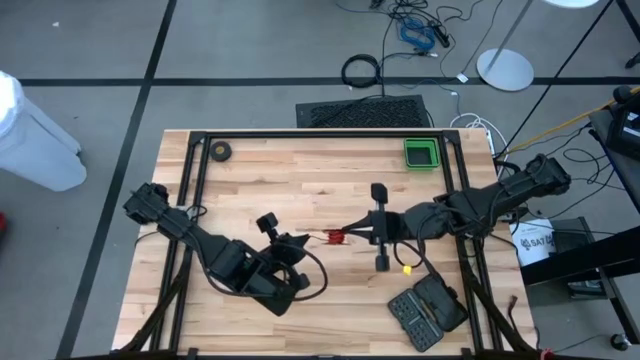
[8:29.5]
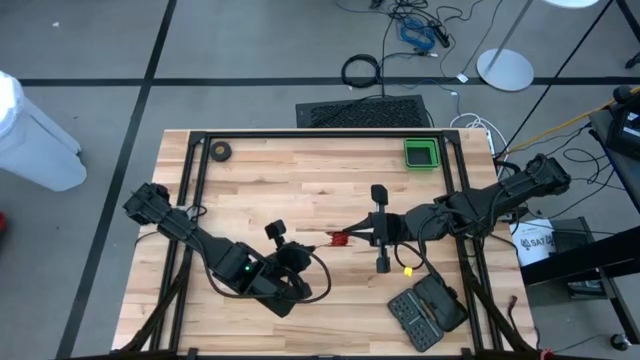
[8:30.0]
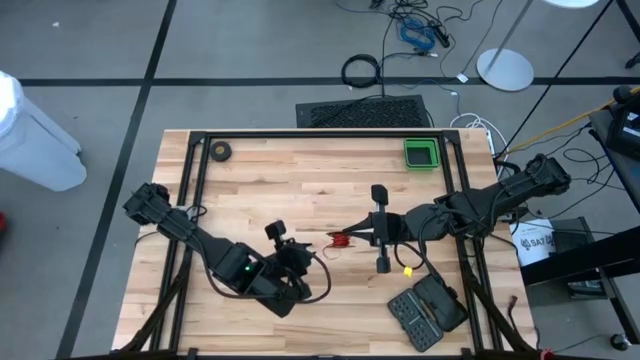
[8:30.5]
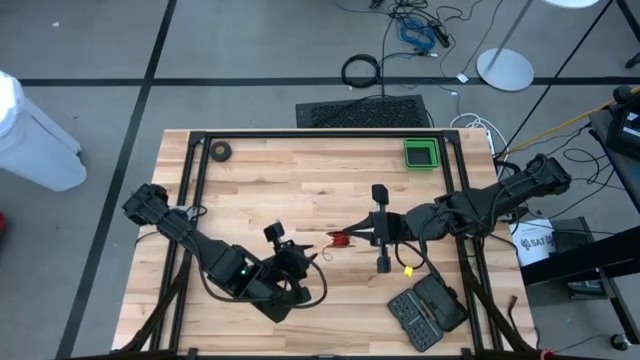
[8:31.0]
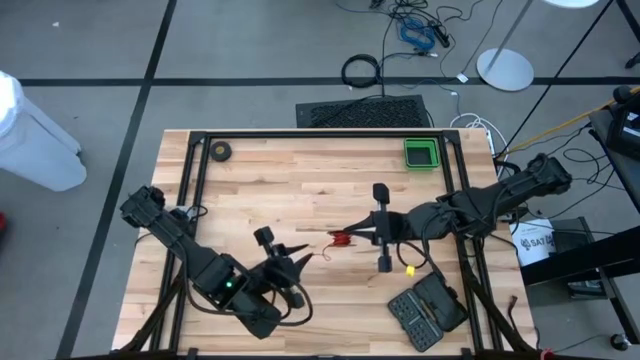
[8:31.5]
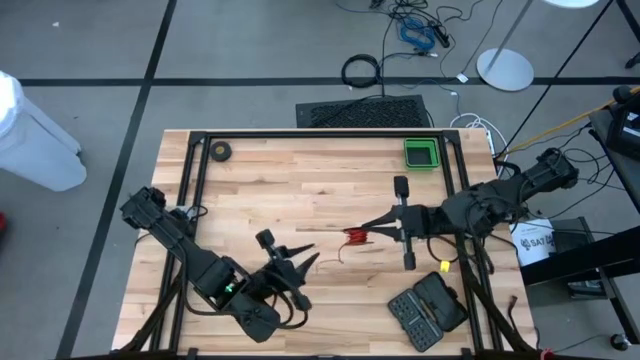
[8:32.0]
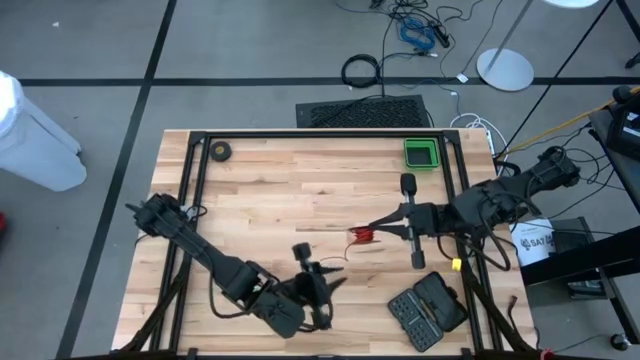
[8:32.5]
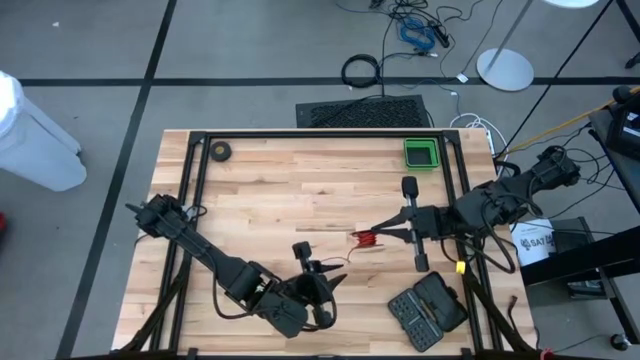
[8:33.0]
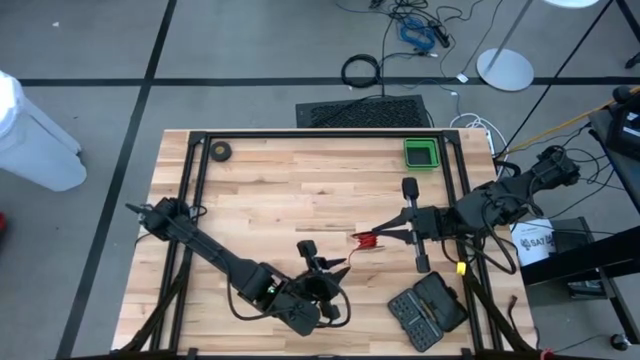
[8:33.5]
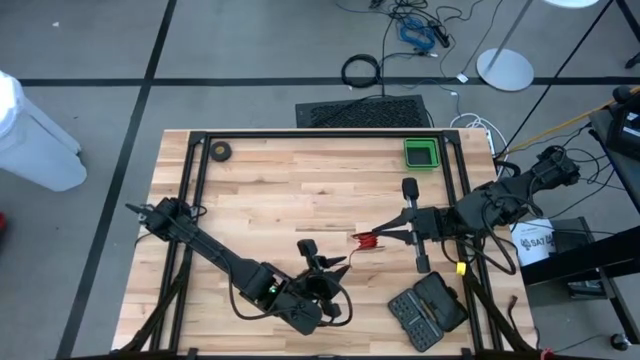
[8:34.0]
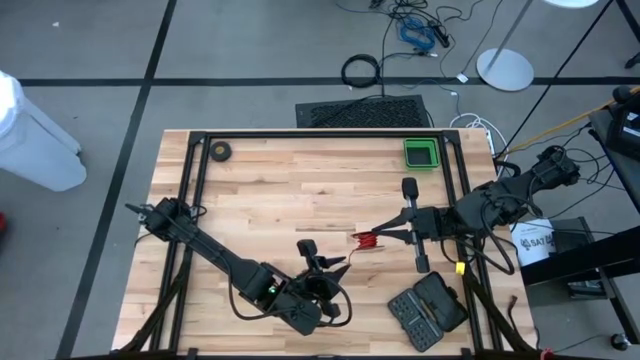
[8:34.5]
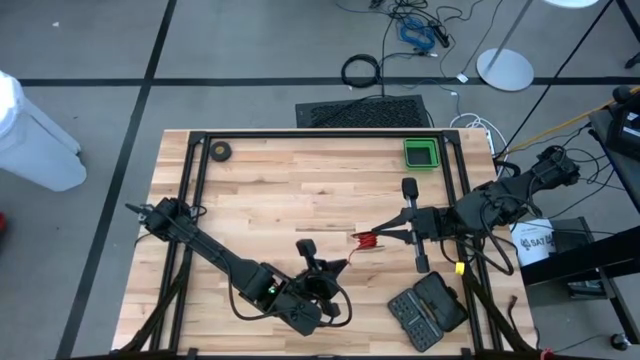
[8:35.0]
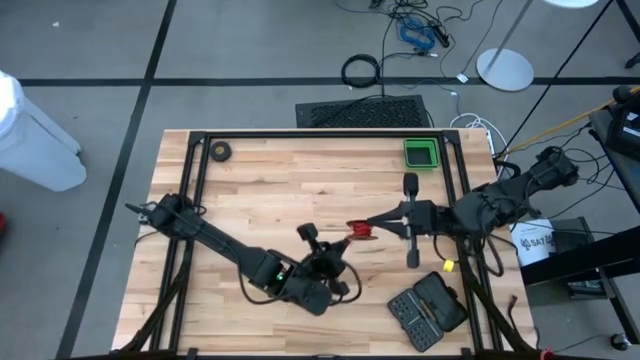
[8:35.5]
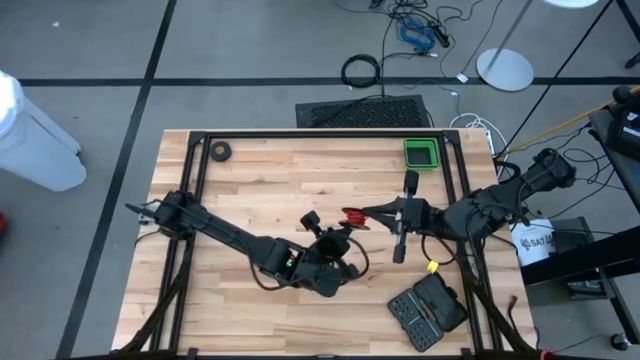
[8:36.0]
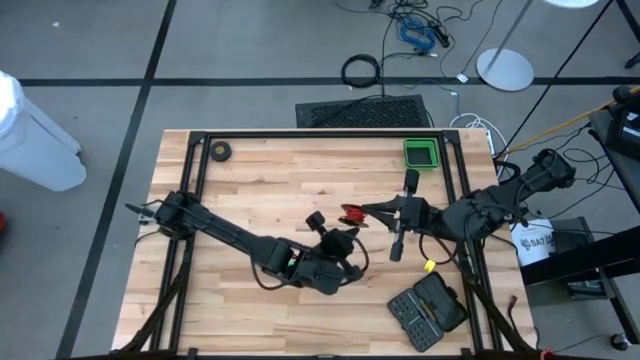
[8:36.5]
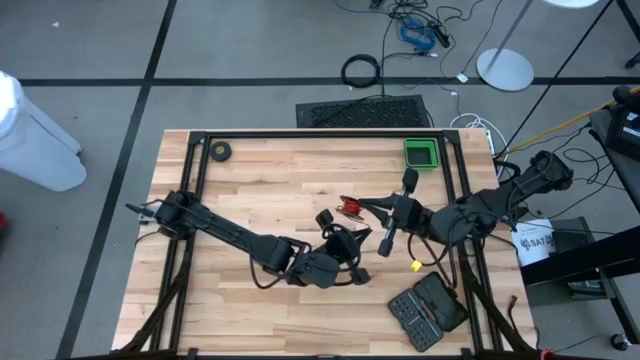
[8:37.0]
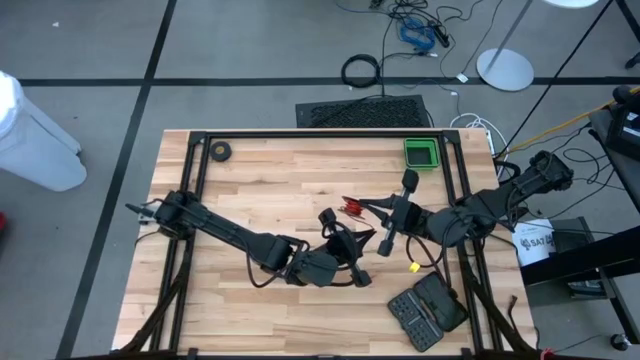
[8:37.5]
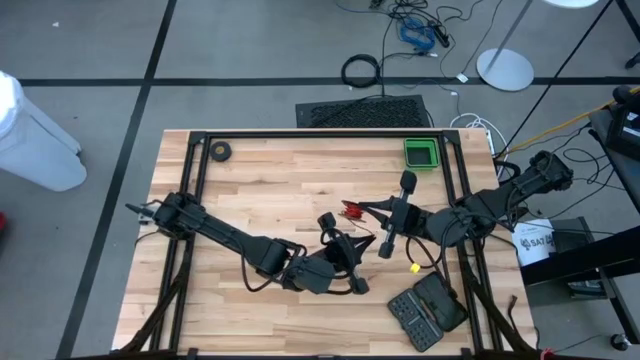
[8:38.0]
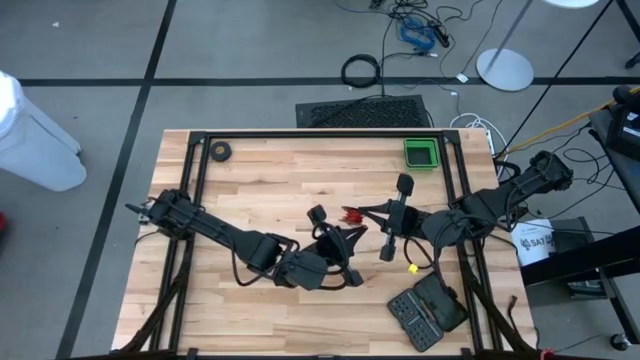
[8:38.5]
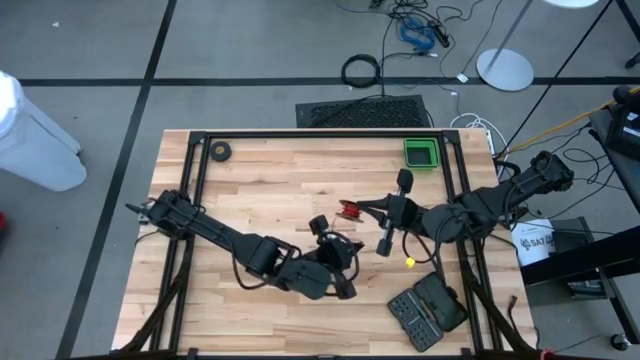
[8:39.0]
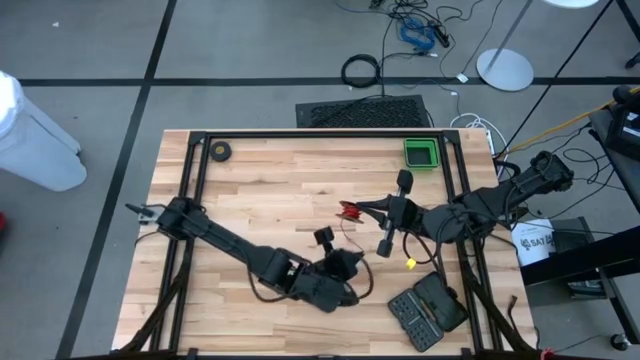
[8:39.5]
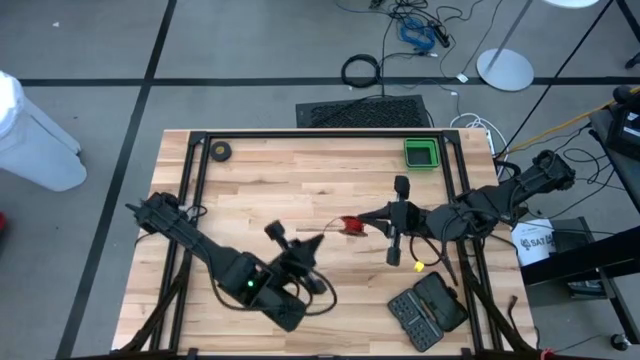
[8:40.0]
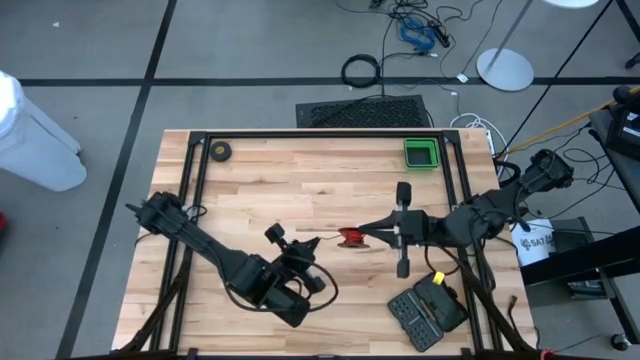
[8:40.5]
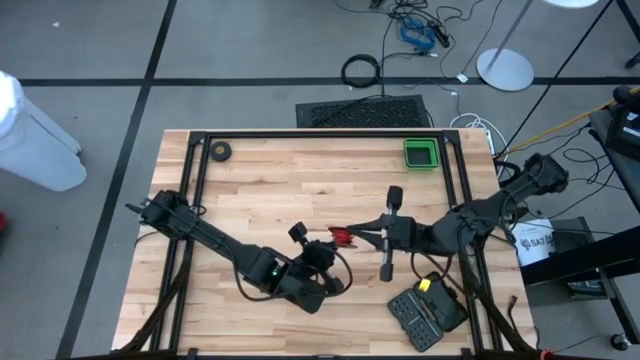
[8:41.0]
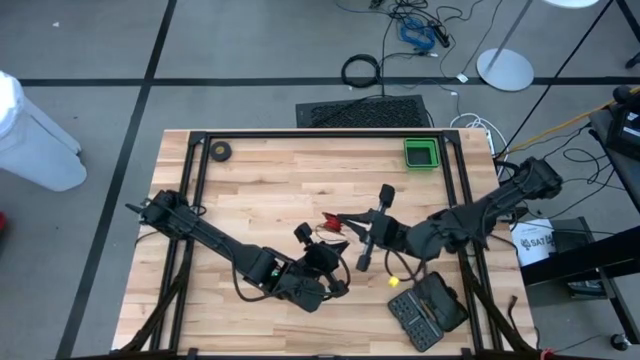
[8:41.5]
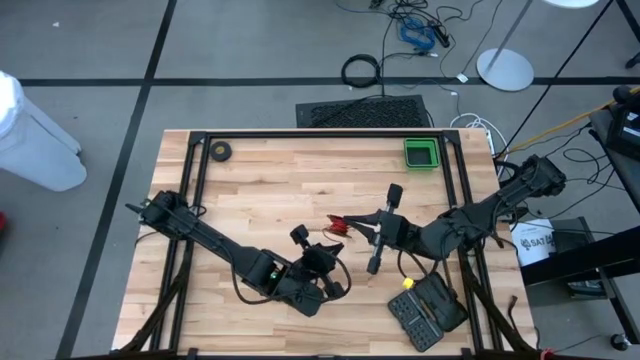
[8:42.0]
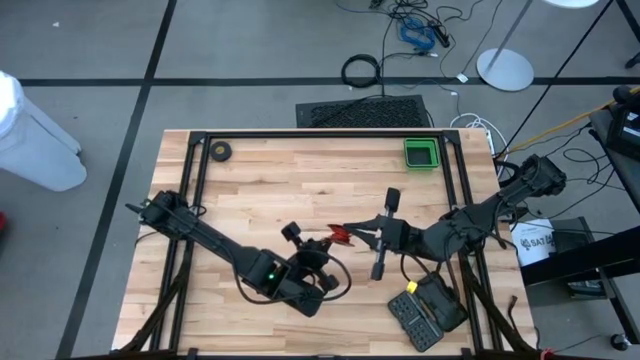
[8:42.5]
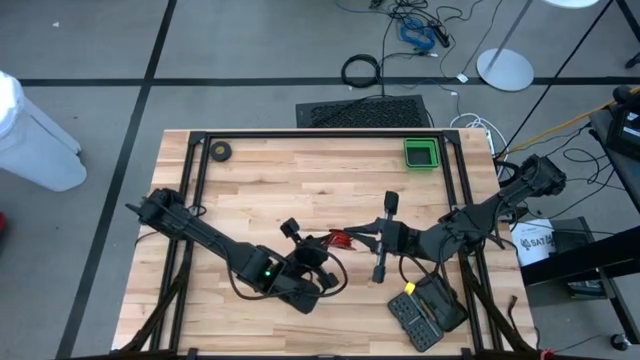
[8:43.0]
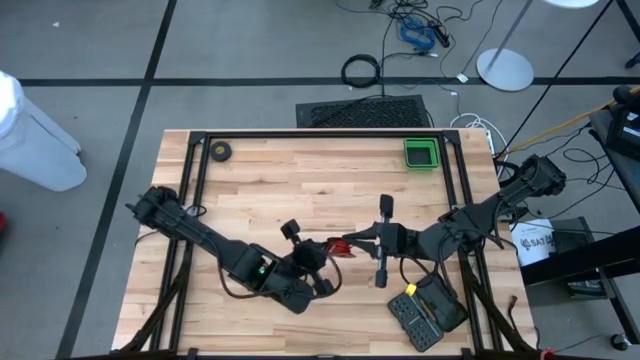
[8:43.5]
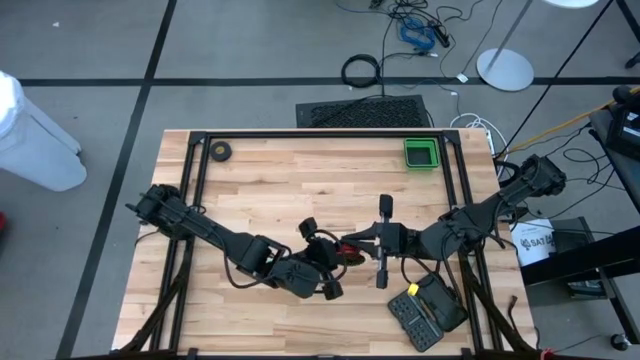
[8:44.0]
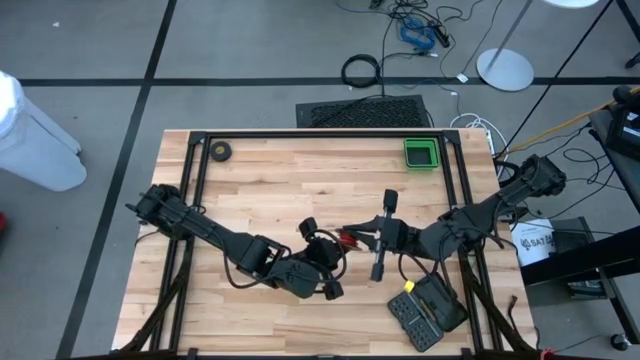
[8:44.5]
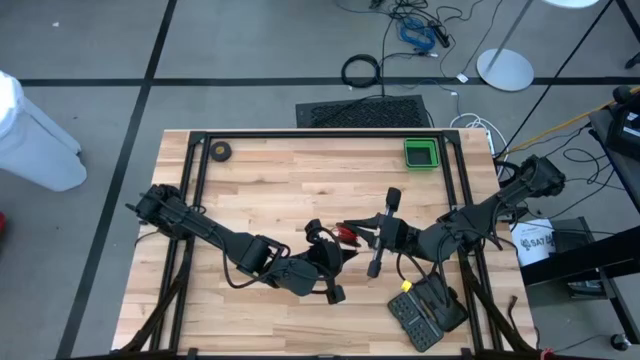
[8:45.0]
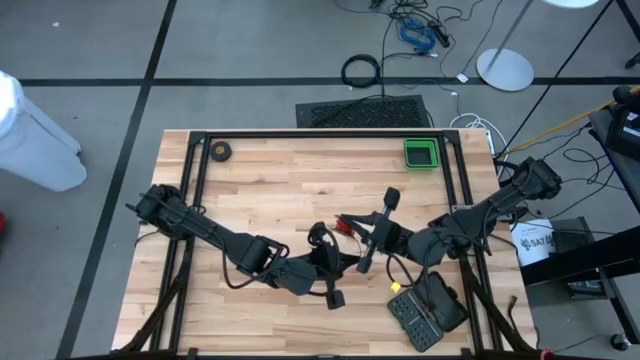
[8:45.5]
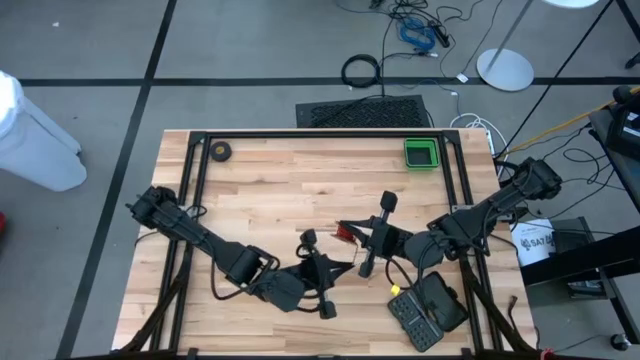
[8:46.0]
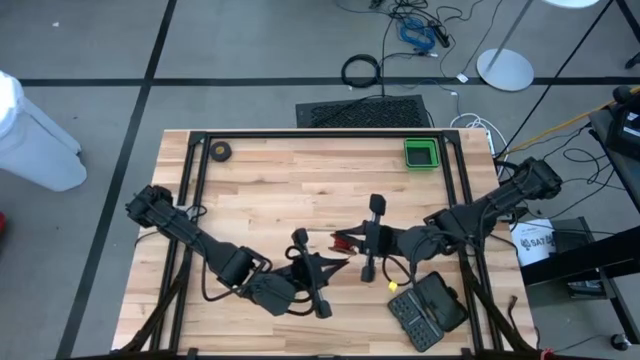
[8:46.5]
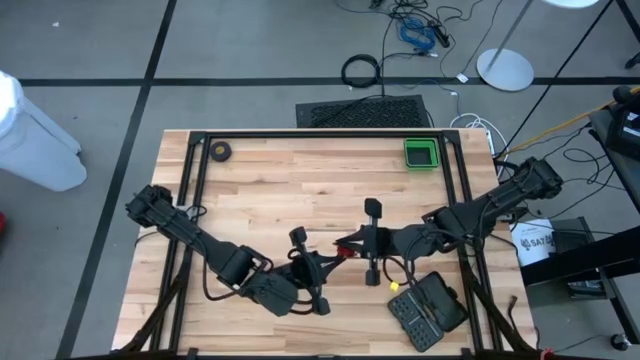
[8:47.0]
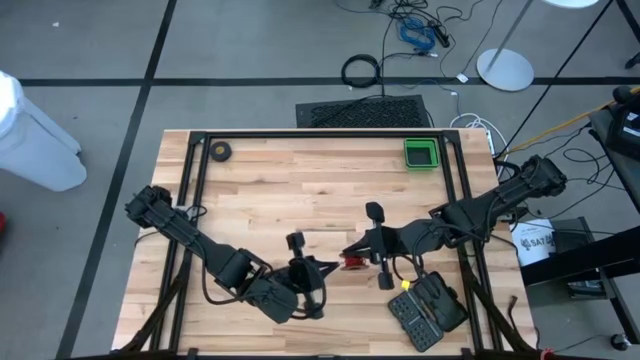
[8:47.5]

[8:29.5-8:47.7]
Task: Coil cords
Coil the red wire into the spool
